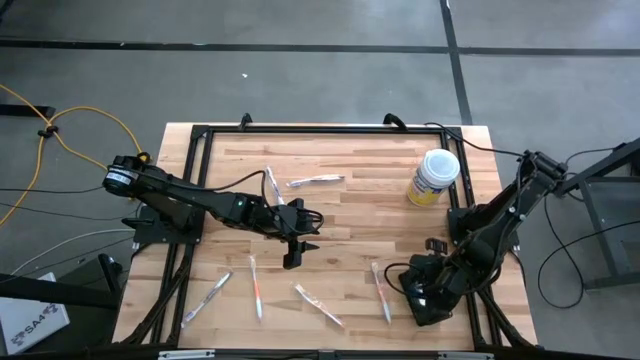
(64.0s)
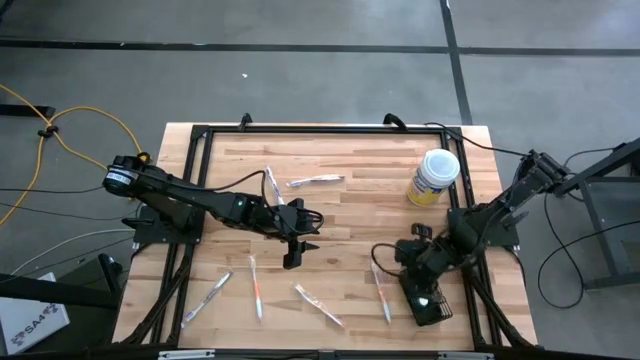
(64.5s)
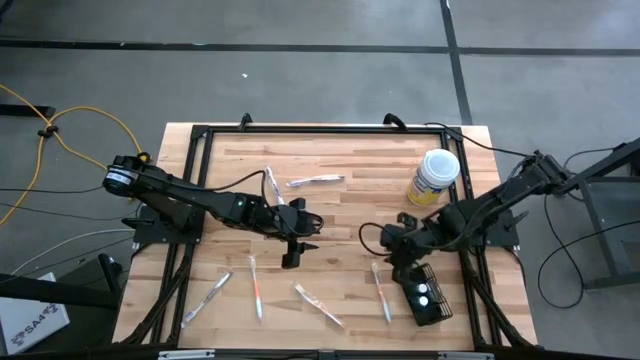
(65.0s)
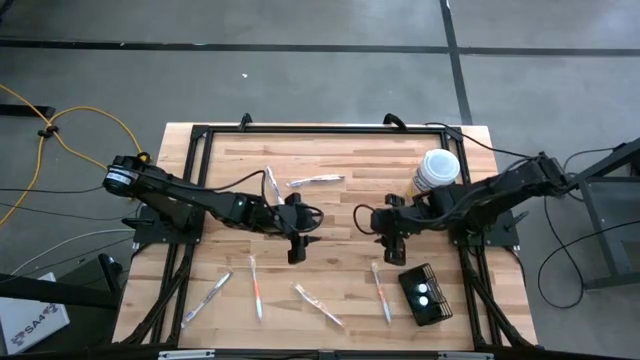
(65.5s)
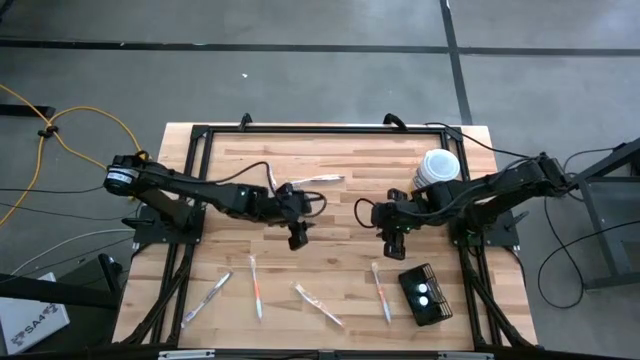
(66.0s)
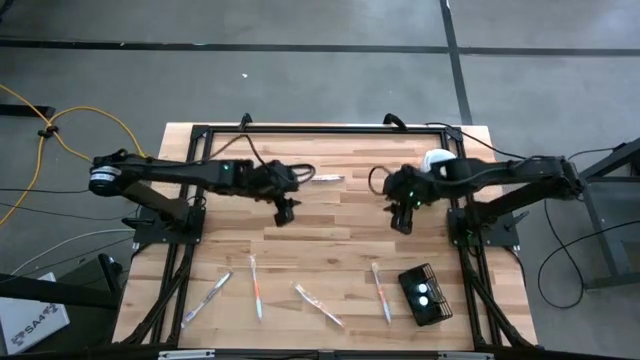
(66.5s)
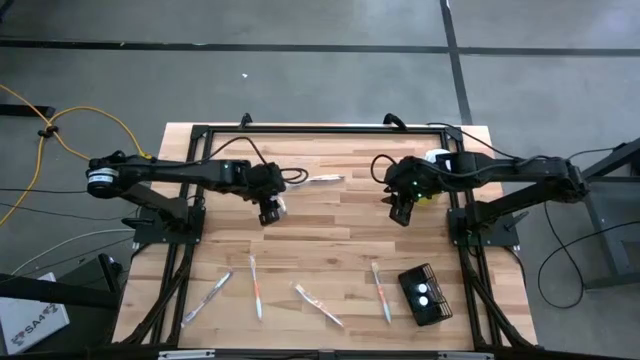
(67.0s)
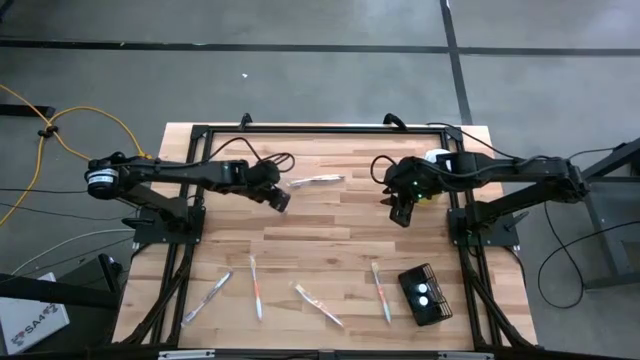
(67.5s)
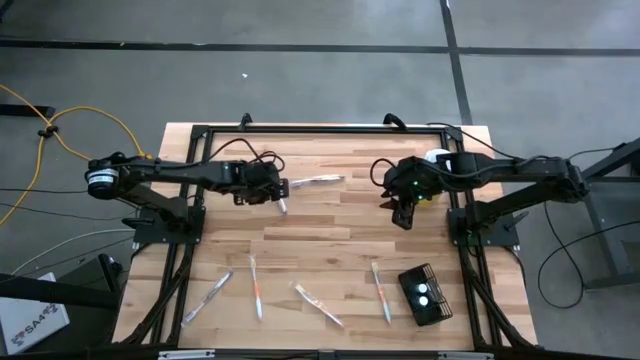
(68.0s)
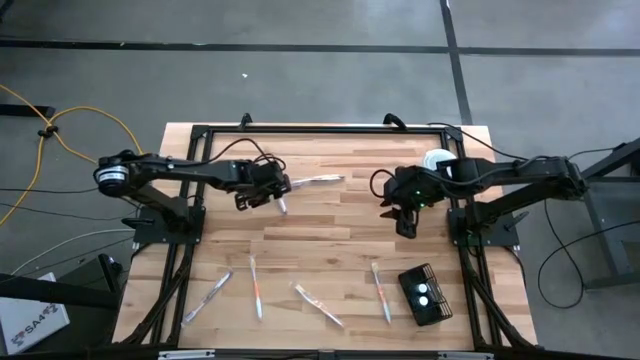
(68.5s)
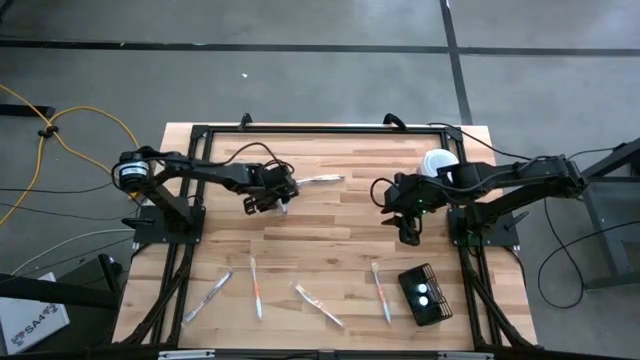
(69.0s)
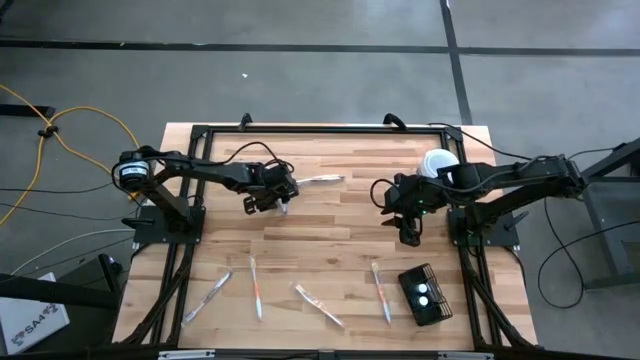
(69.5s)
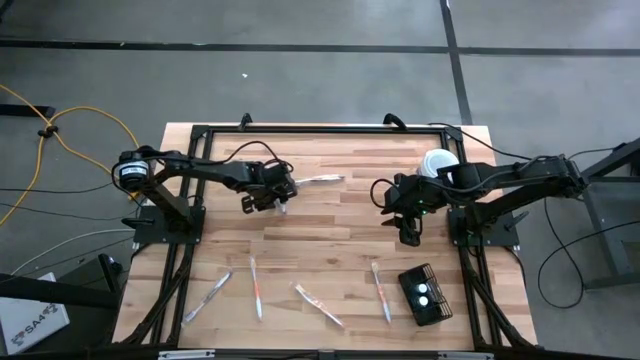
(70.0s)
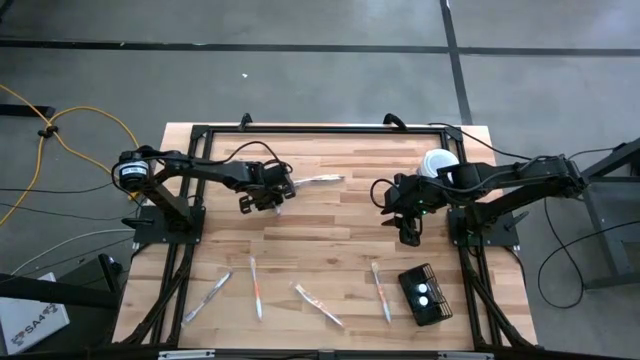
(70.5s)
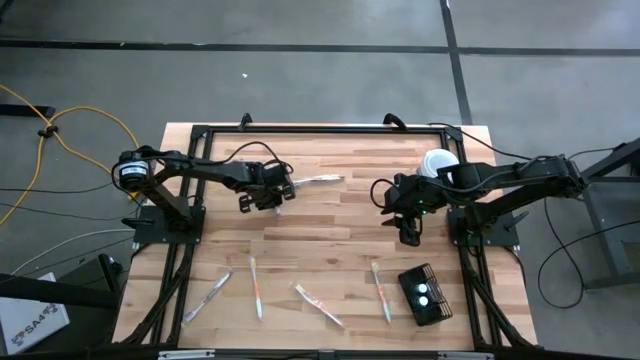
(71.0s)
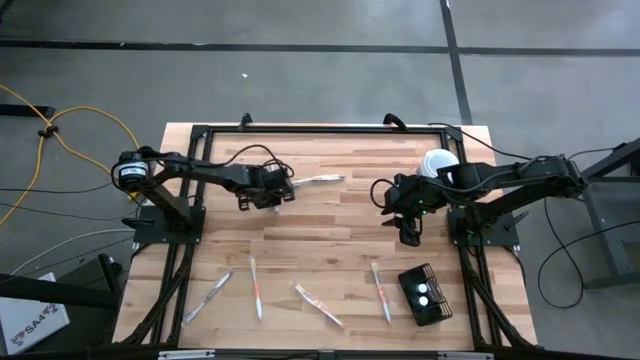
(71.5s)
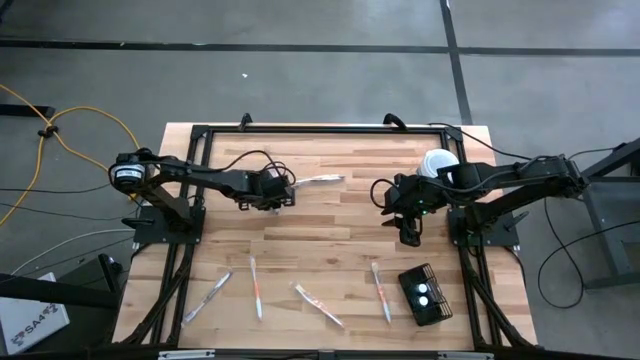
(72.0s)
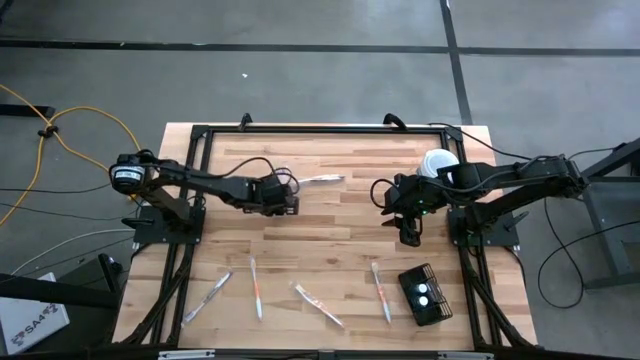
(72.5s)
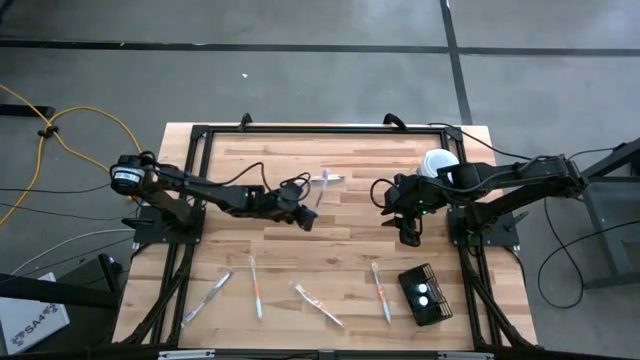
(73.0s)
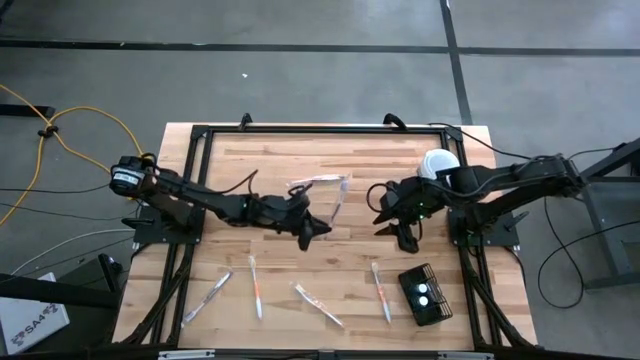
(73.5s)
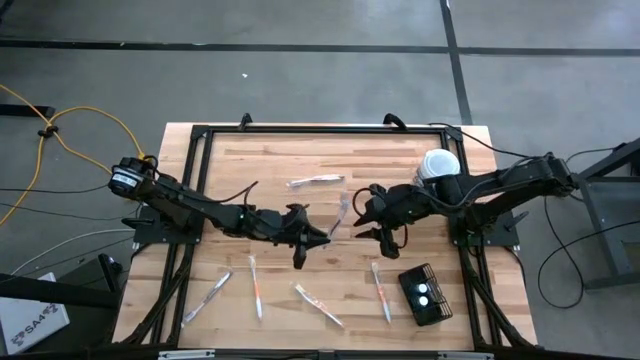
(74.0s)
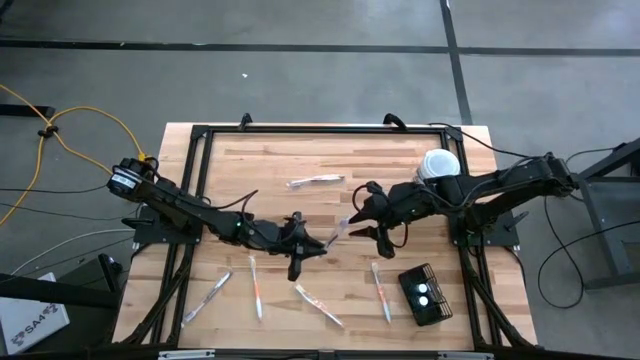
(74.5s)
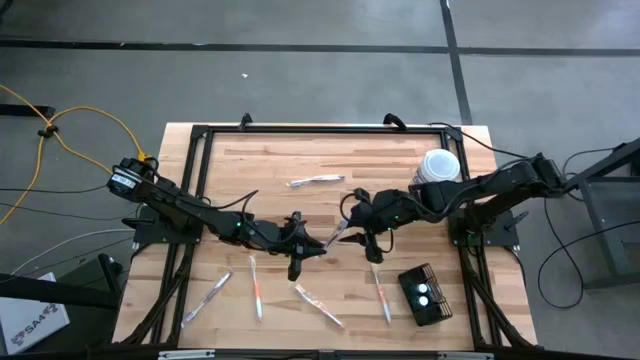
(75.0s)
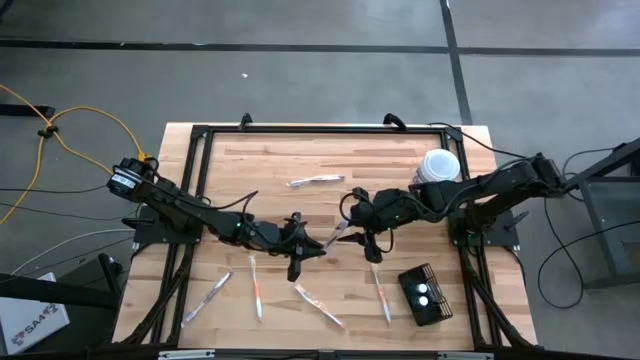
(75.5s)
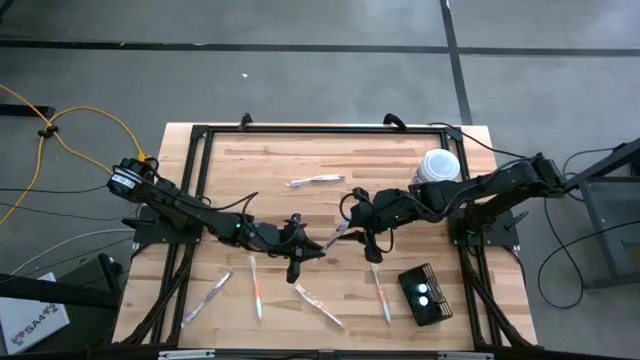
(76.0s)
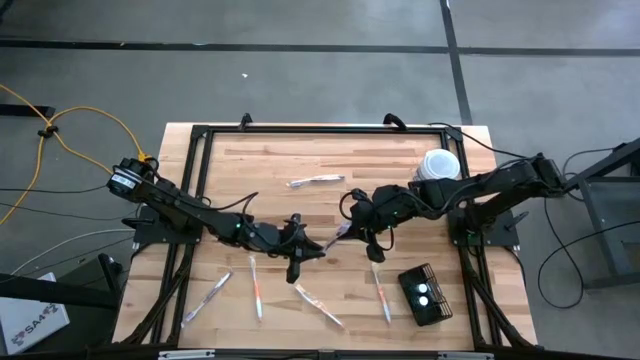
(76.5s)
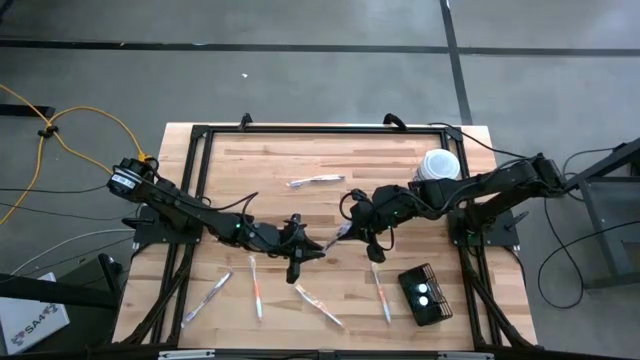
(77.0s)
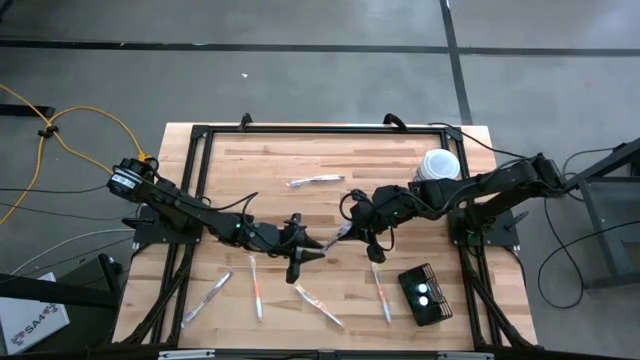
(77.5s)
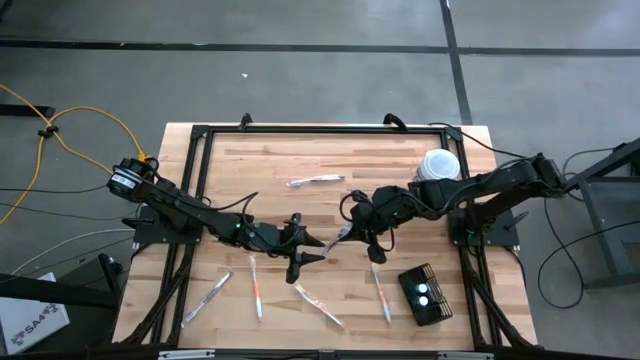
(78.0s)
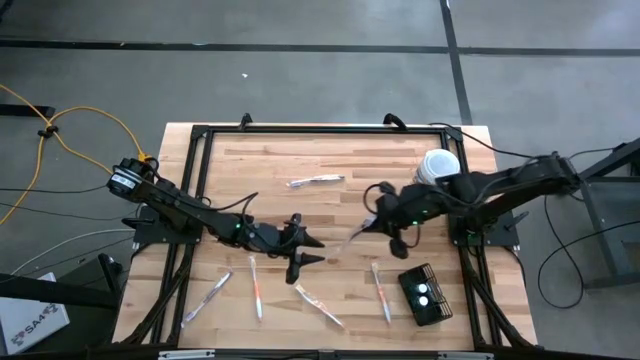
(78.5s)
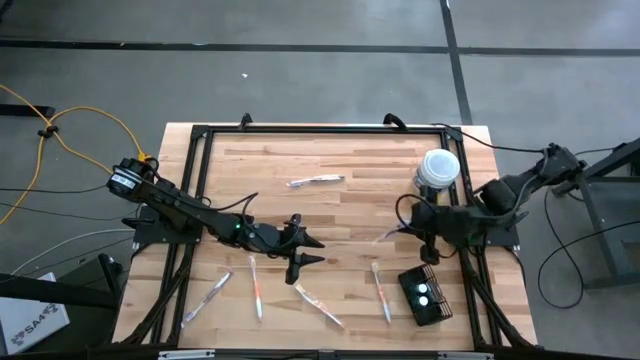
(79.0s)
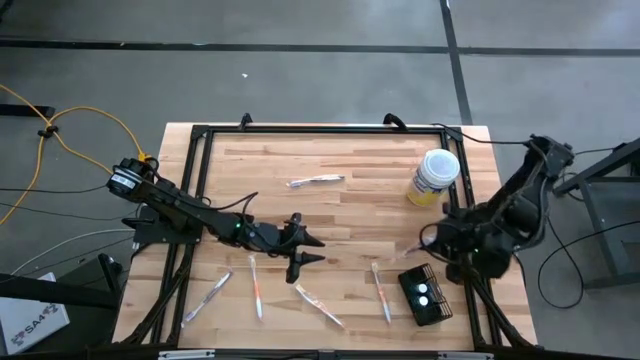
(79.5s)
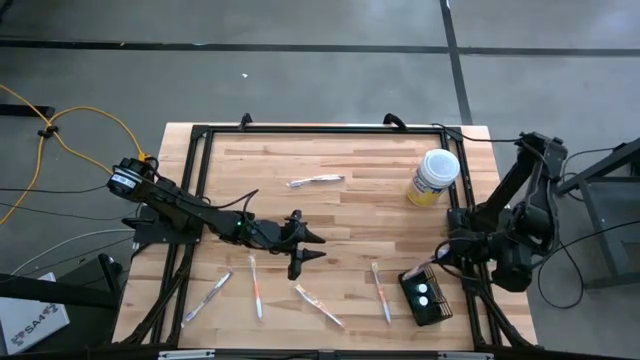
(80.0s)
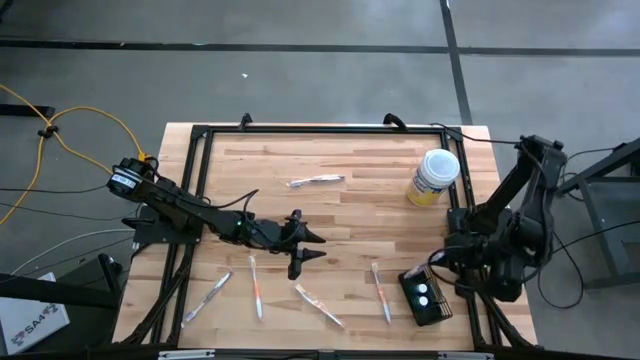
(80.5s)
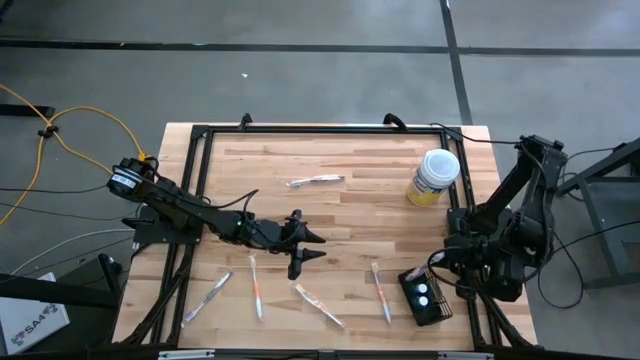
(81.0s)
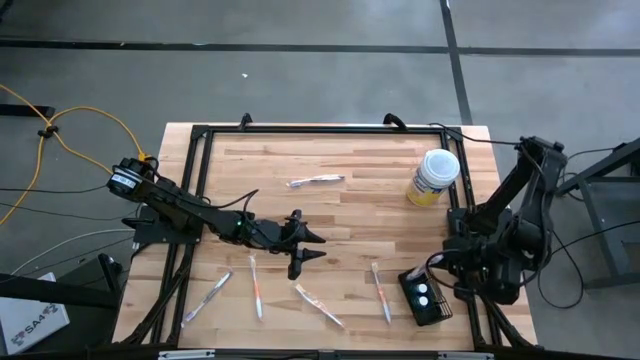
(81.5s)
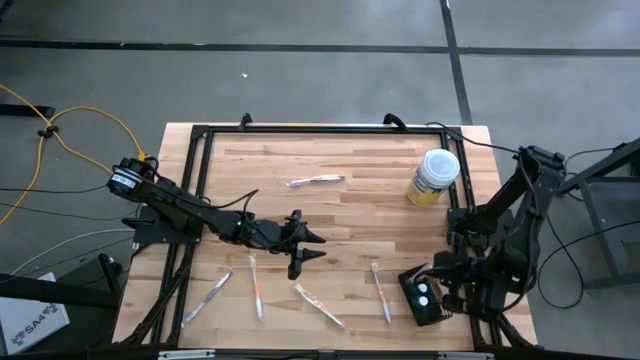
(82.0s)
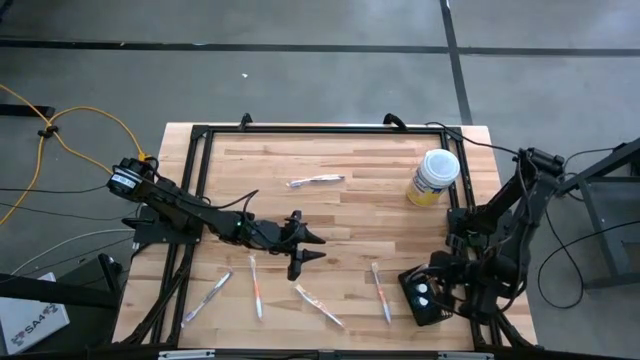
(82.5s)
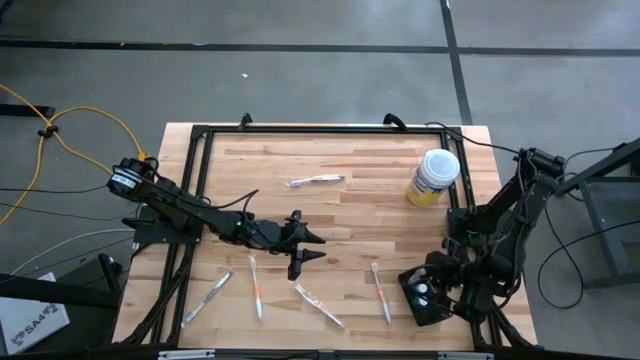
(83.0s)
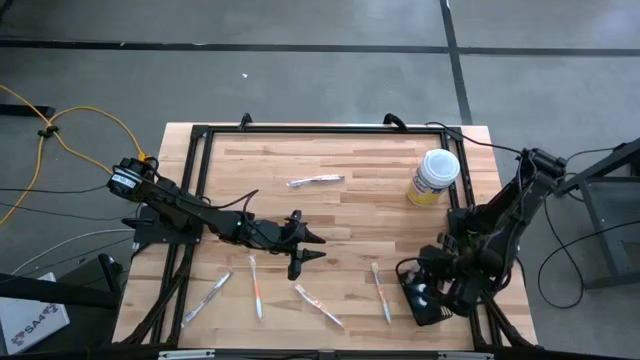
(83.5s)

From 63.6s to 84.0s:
Task: Pick & Place toothbrushing station
Put the purple toothbrush into the mesh organizer
